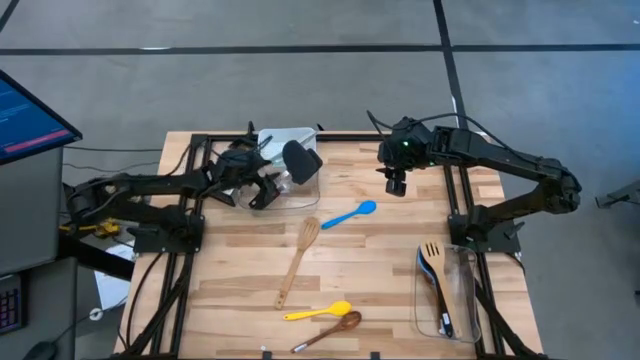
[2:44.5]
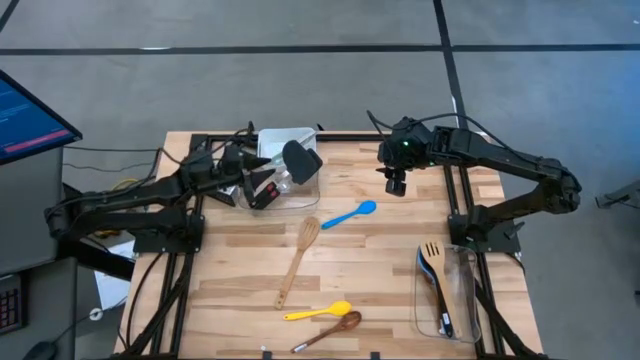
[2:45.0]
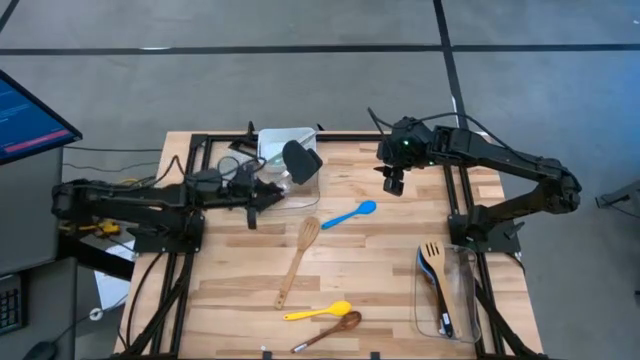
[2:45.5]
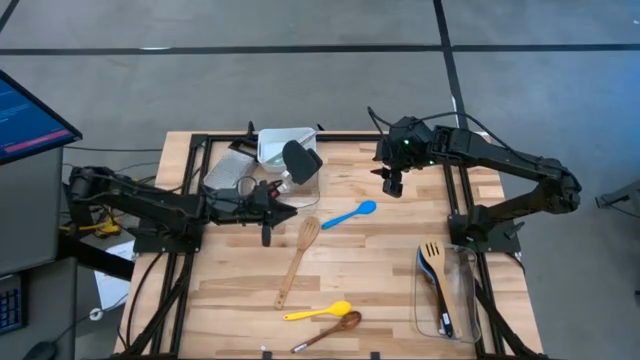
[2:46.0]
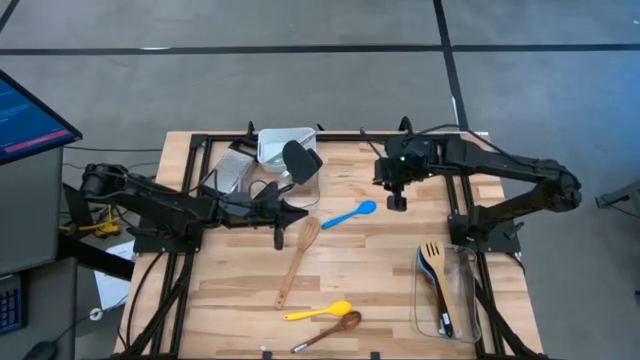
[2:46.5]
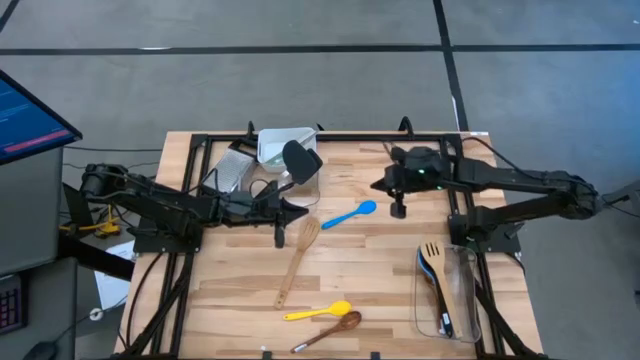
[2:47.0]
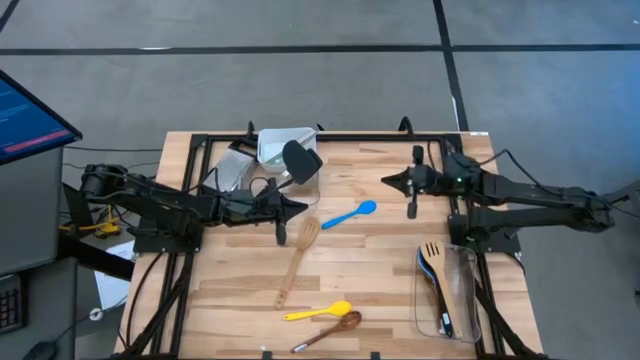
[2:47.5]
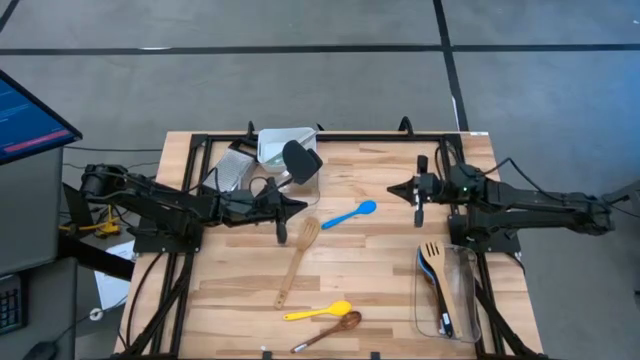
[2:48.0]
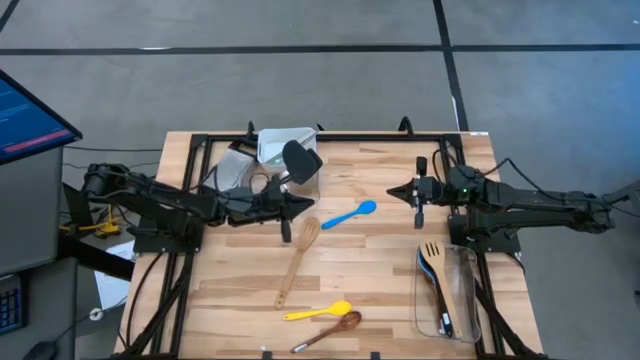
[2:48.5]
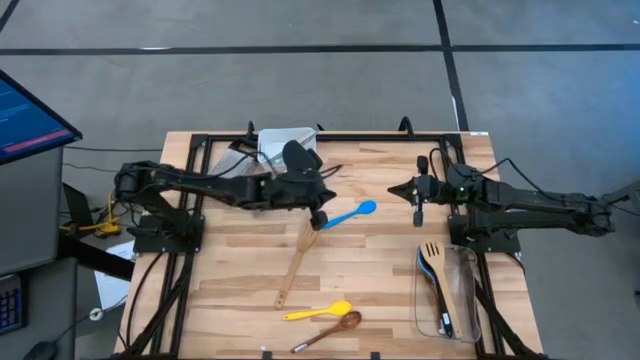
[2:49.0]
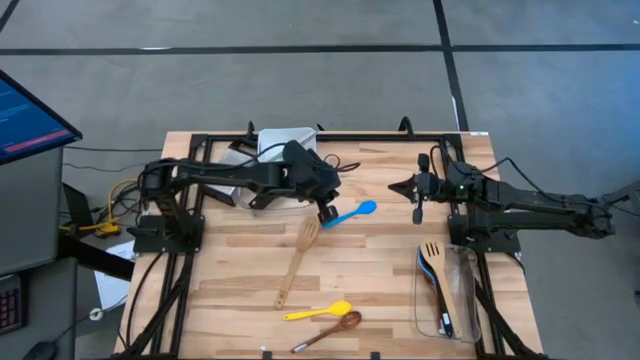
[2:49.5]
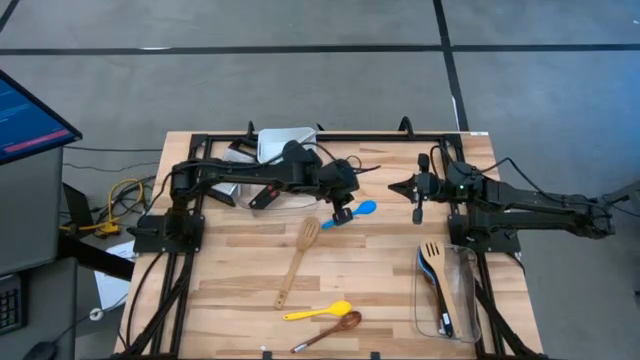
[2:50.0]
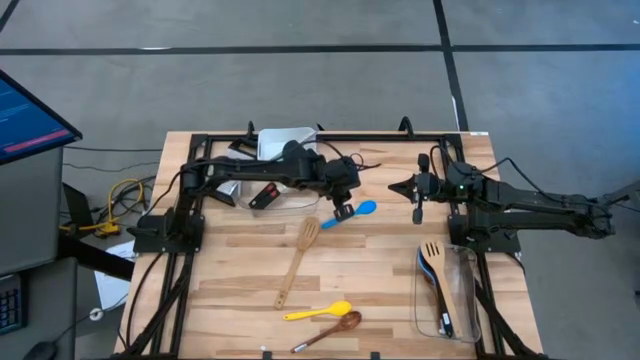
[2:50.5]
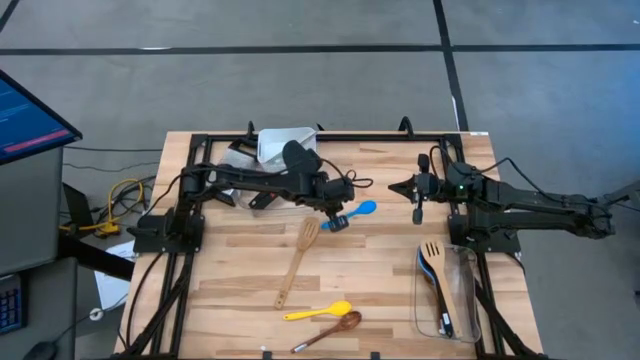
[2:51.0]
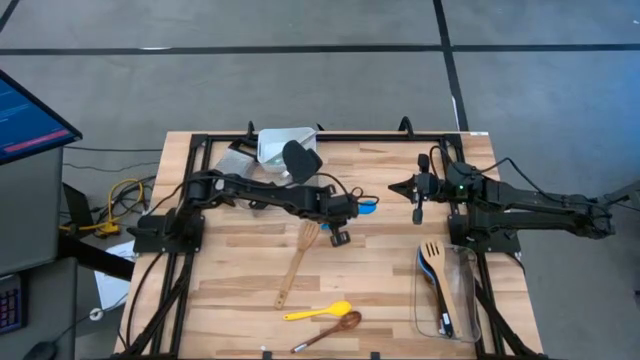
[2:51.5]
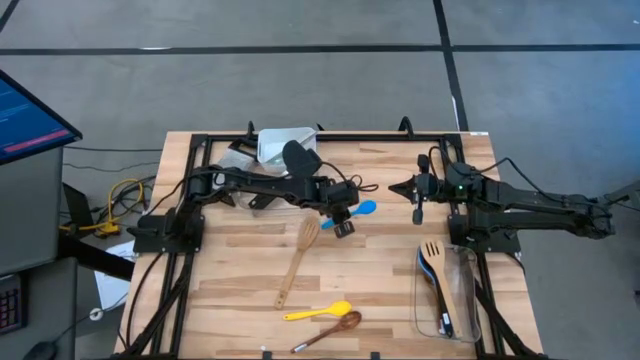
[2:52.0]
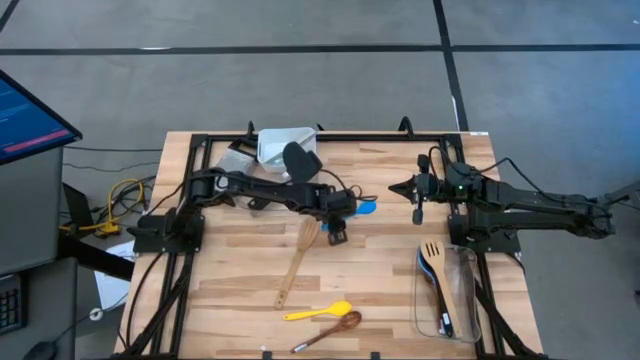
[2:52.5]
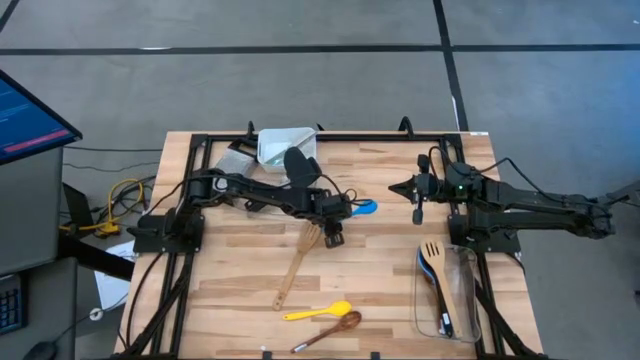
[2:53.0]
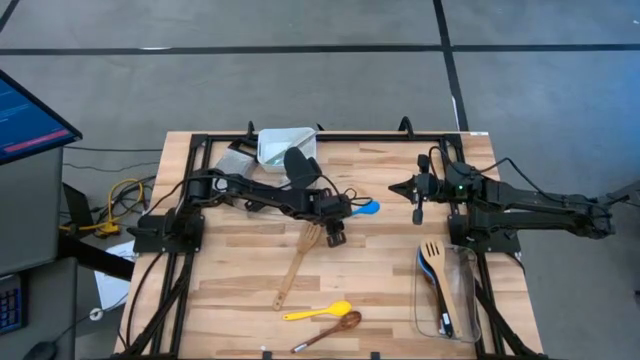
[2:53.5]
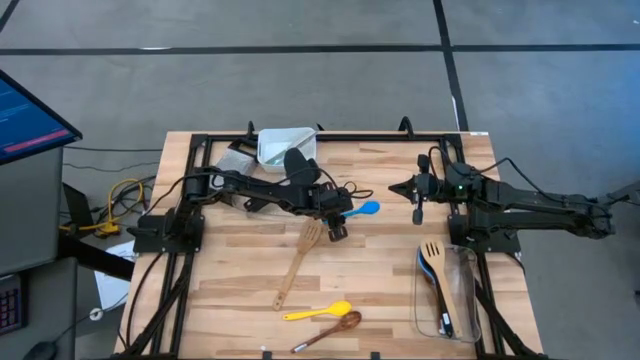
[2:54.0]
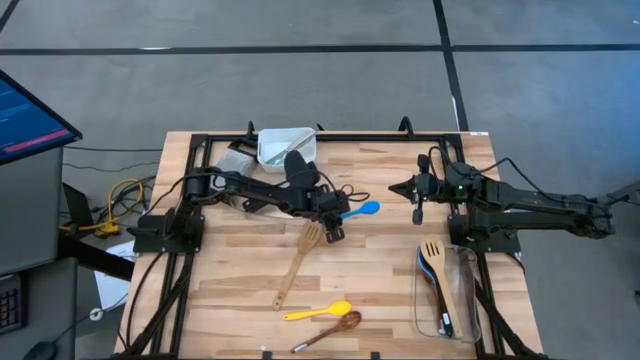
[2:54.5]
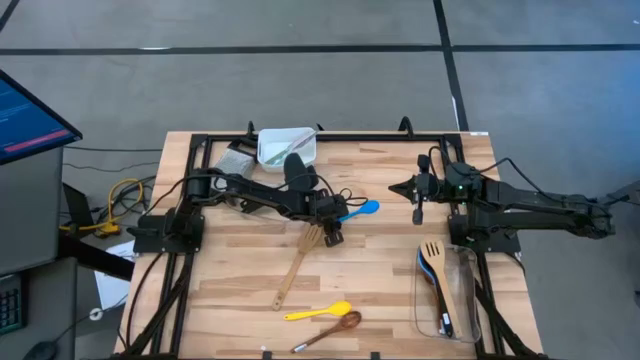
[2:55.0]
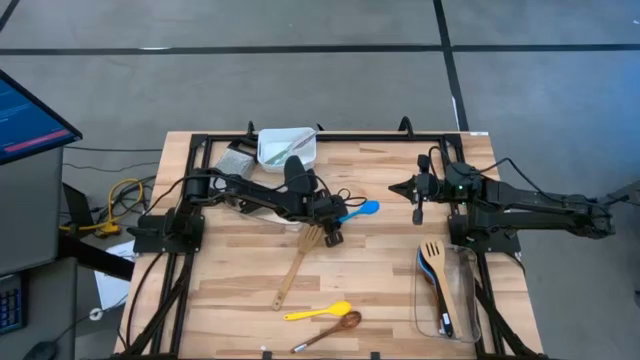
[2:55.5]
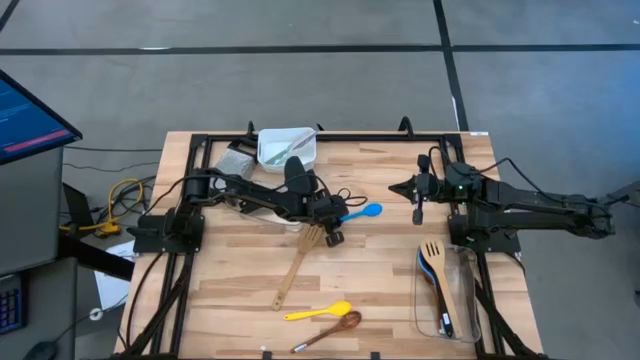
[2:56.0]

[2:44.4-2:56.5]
Task: Pick & Place Kitchen Items
Put the blue spoon into the bottom transparent bin

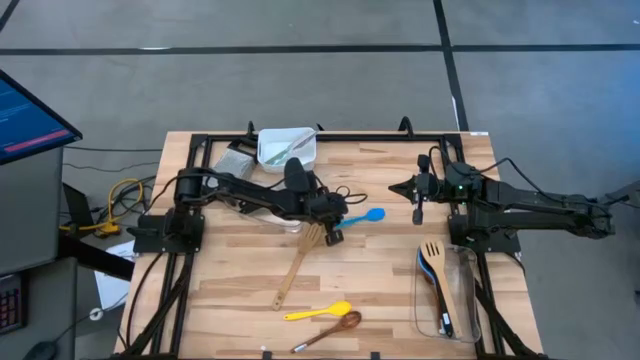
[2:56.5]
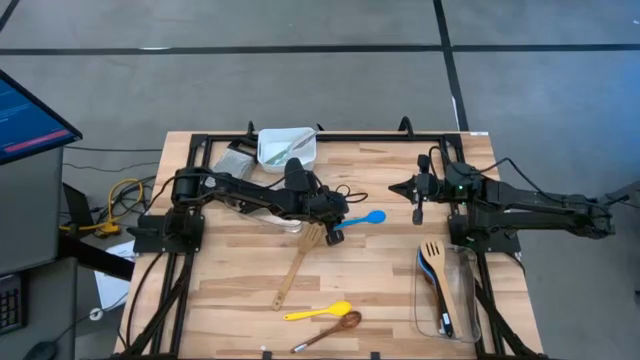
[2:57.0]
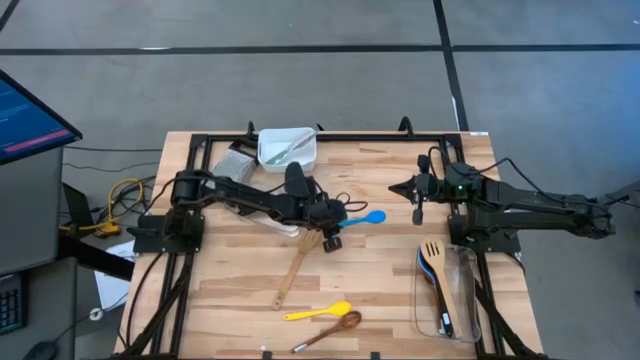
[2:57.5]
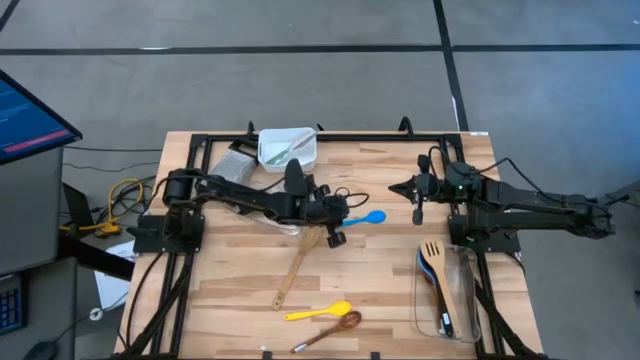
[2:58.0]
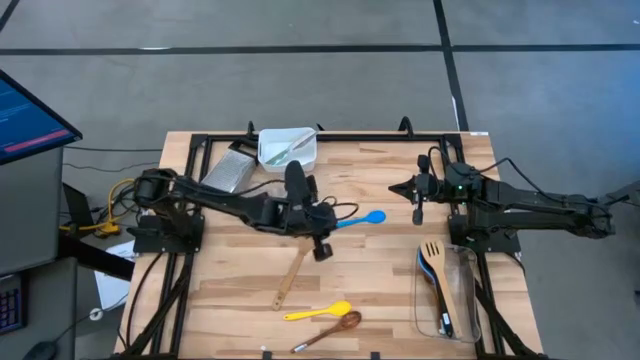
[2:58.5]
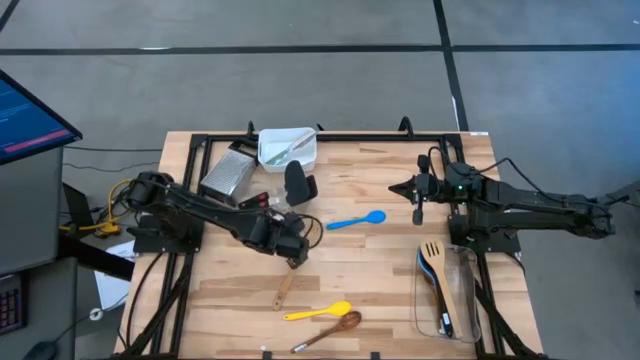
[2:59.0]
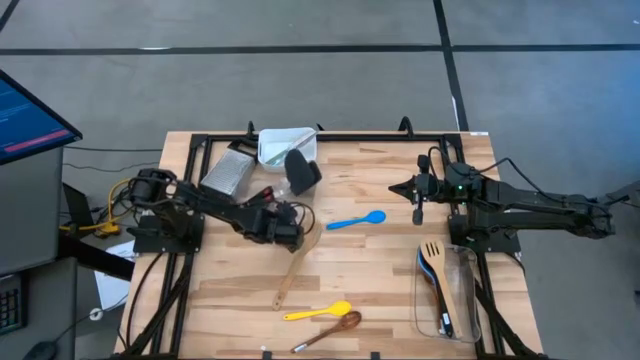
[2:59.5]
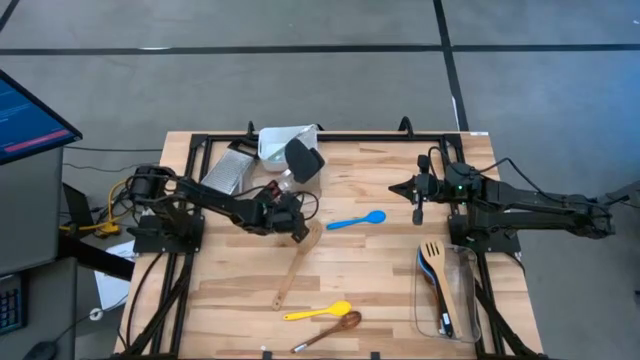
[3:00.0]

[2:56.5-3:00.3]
Adjust the top transparent bin

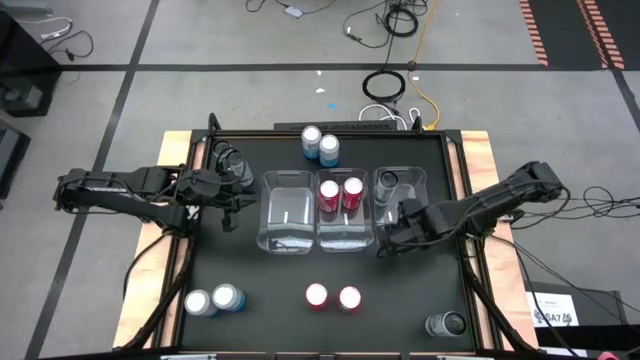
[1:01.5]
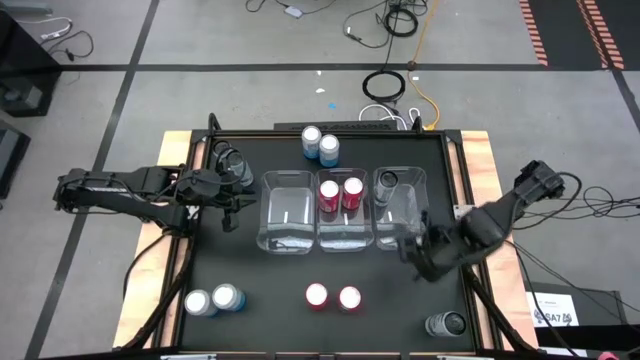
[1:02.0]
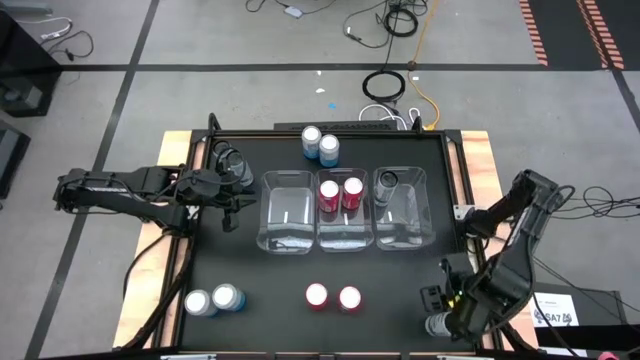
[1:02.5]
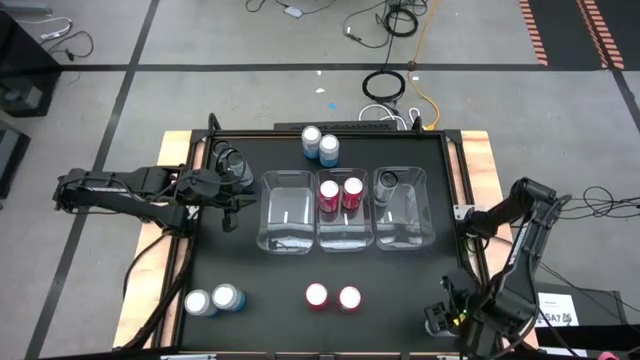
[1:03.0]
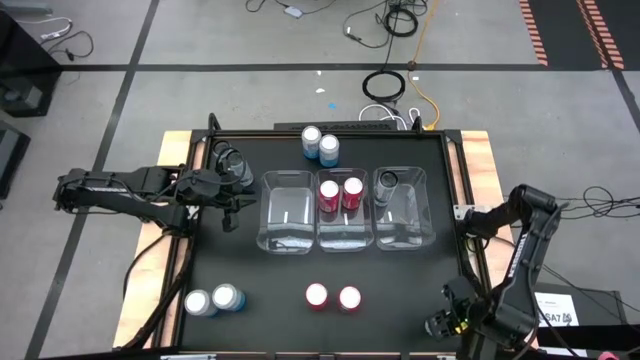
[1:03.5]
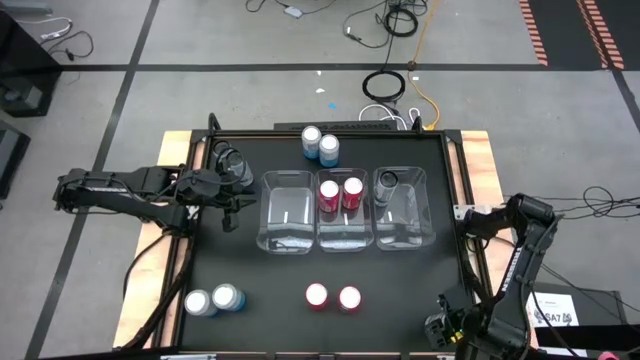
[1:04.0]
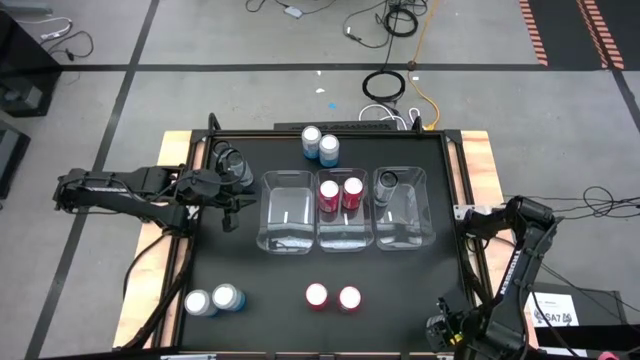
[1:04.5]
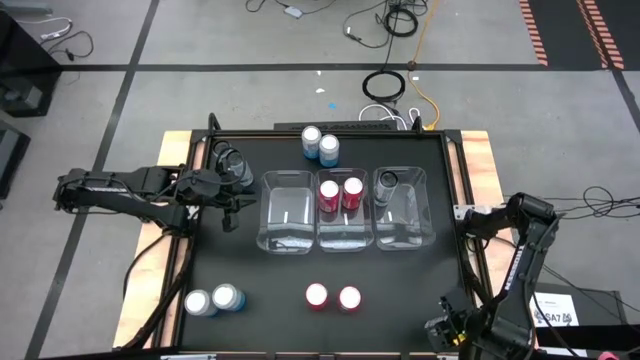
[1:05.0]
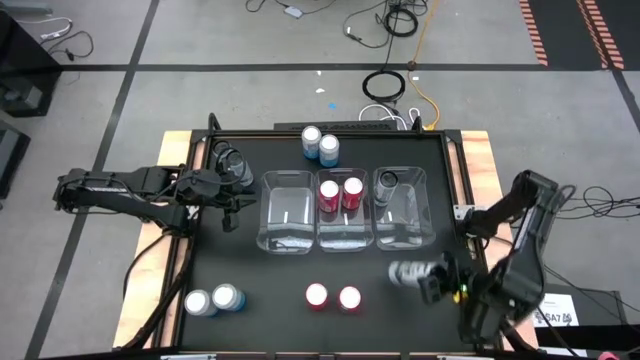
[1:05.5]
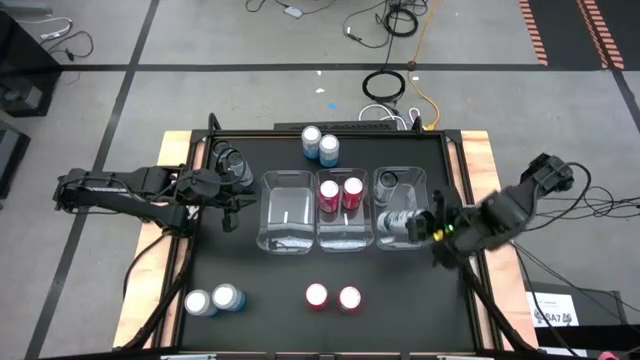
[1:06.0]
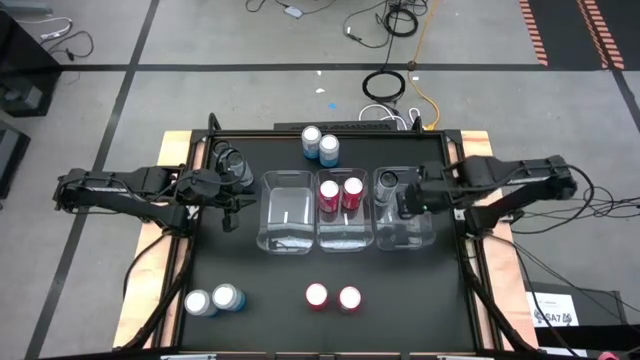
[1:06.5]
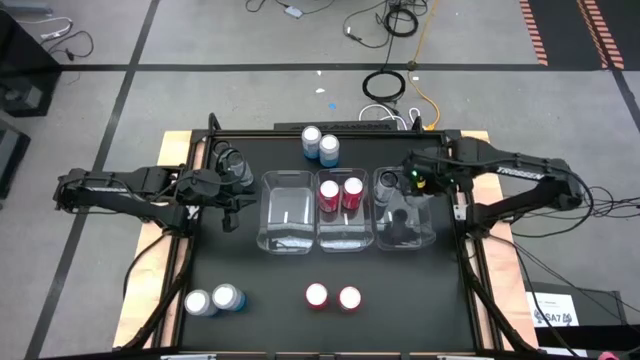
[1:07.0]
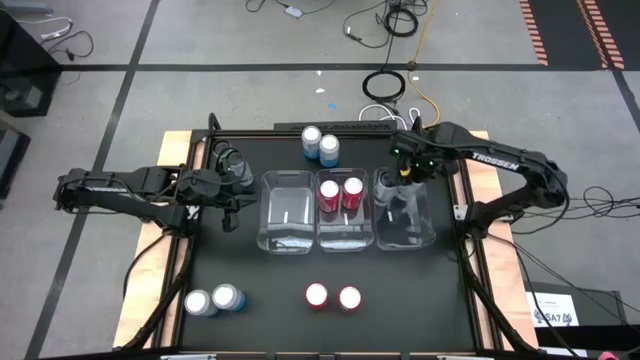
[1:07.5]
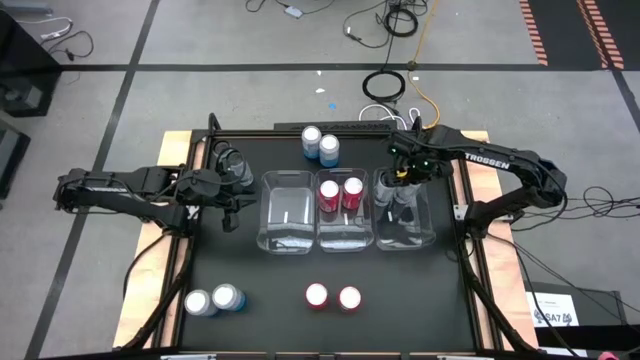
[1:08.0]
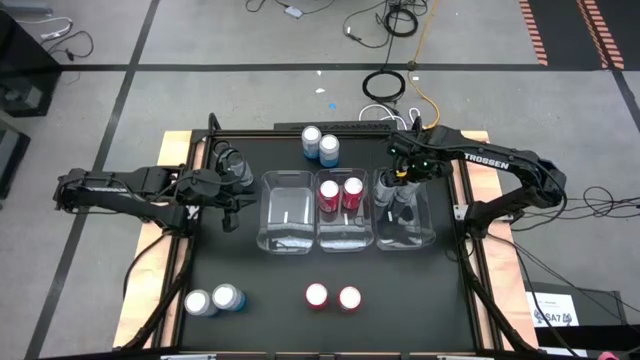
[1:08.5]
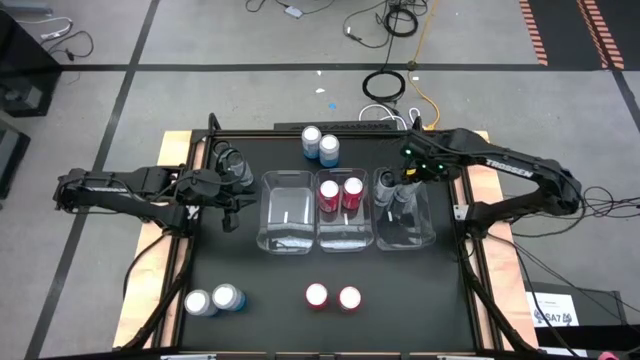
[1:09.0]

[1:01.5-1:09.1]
Task: Sort soda cans
Put the white-blue soda can into the right transparent bin
